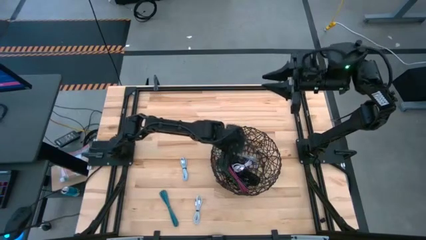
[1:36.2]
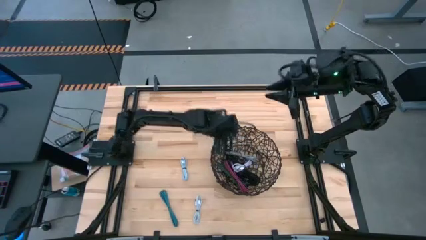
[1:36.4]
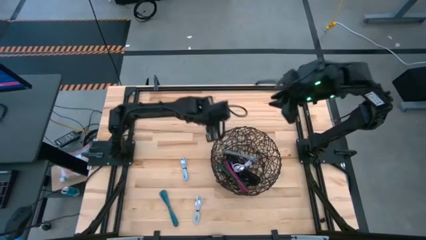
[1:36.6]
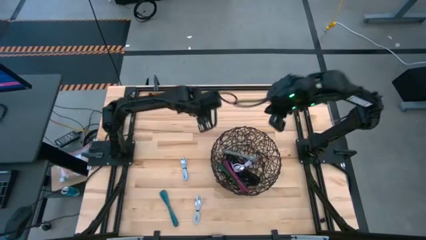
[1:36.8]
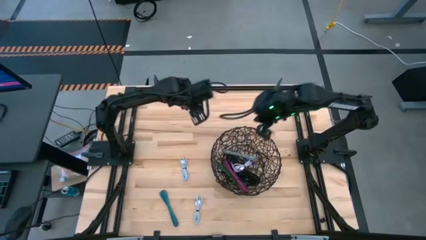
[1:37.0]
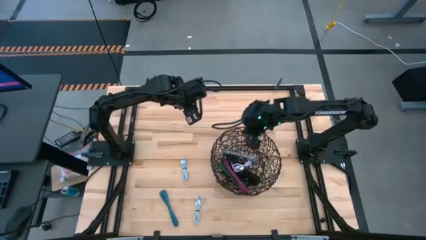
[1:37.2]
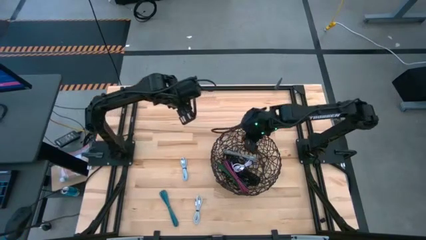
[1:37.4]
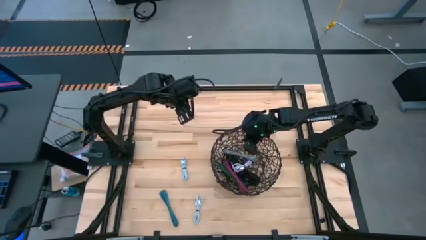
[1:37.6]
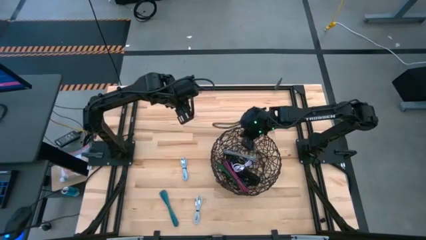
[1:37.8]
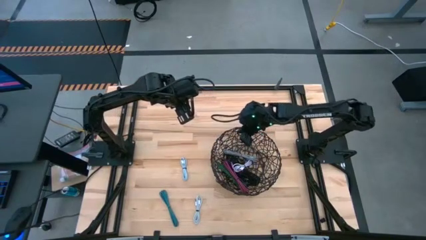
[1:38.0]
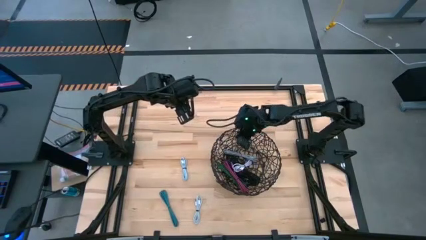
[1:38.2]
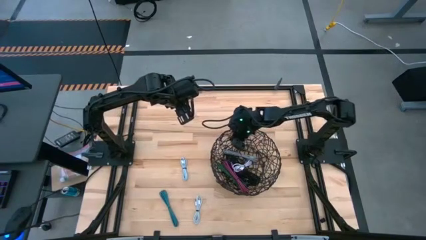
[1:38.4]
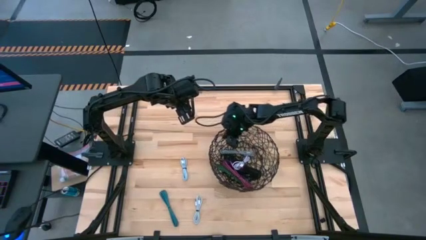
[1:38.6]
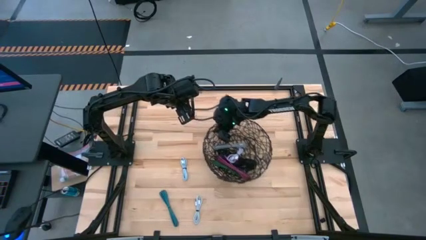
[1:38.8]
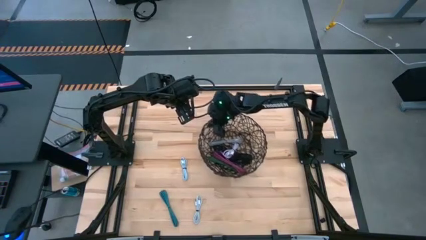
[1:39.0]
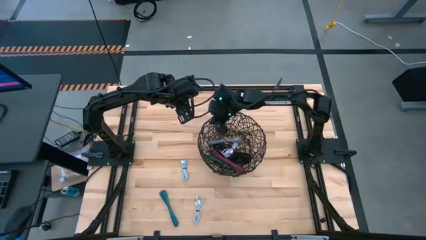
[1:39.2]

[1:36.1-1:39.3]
Task: Pick and place USB-C Cables
Adjust the black wire basket on the table

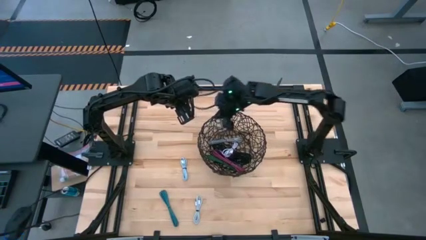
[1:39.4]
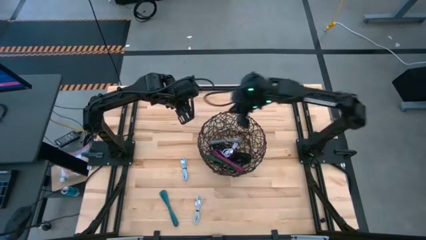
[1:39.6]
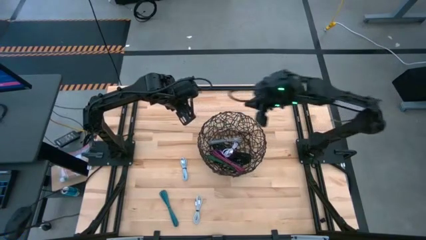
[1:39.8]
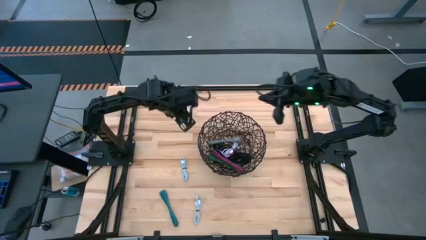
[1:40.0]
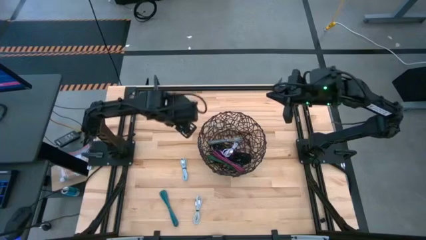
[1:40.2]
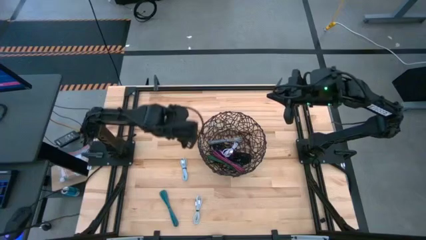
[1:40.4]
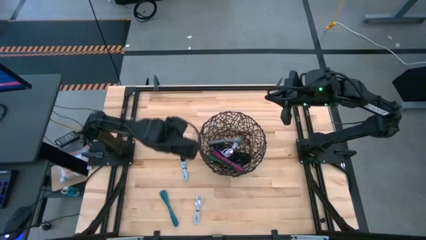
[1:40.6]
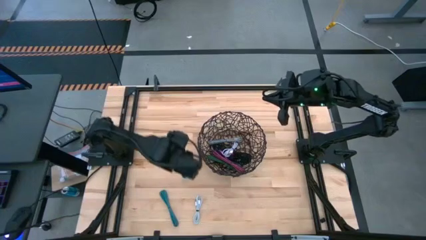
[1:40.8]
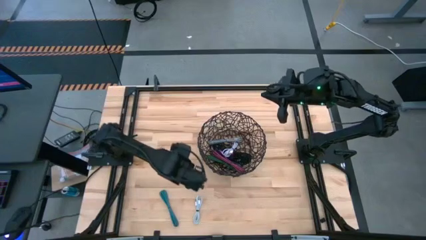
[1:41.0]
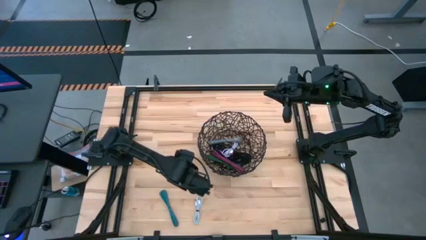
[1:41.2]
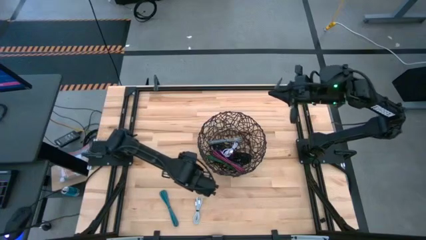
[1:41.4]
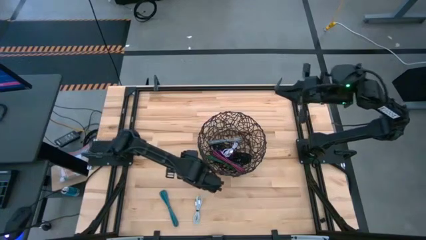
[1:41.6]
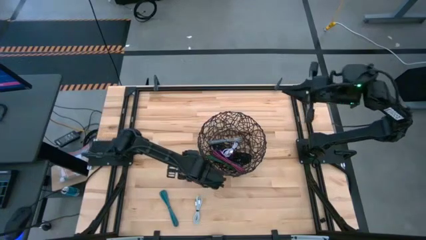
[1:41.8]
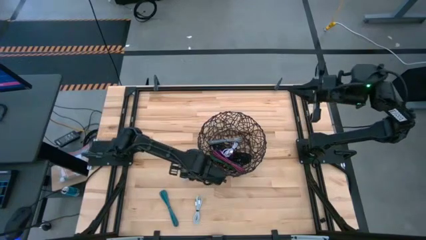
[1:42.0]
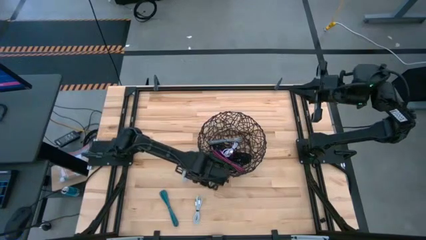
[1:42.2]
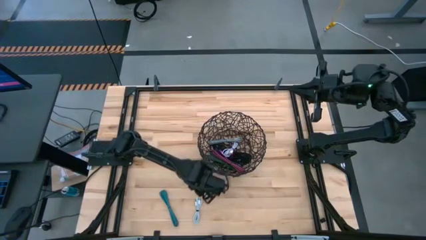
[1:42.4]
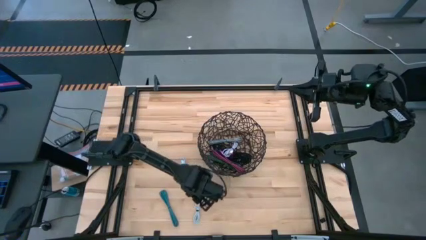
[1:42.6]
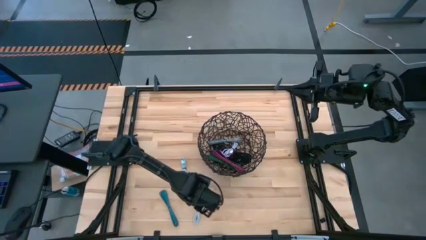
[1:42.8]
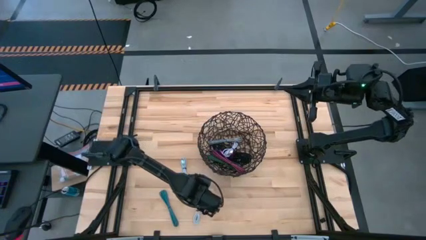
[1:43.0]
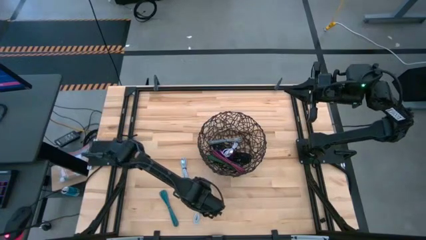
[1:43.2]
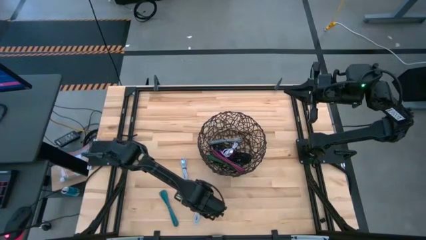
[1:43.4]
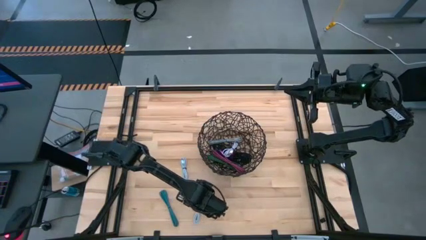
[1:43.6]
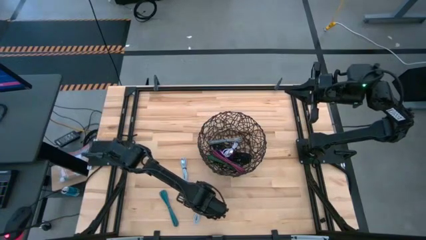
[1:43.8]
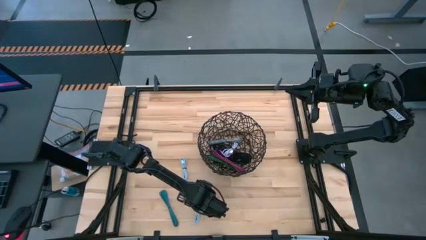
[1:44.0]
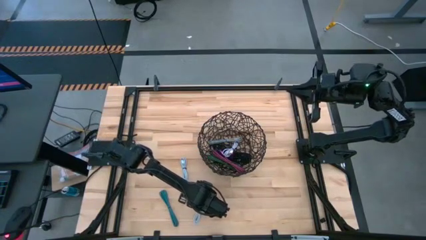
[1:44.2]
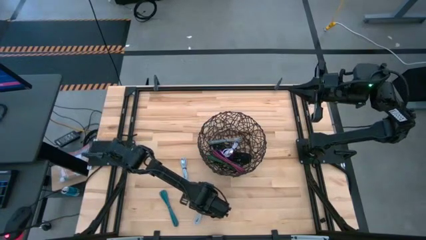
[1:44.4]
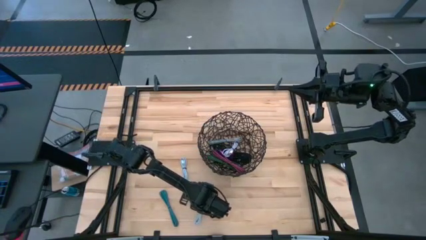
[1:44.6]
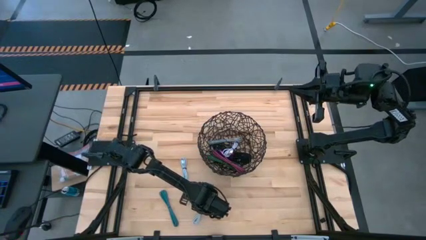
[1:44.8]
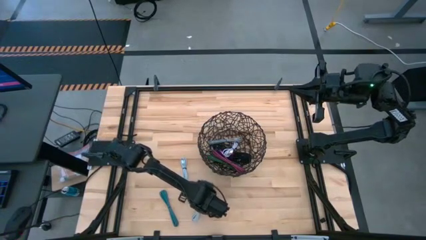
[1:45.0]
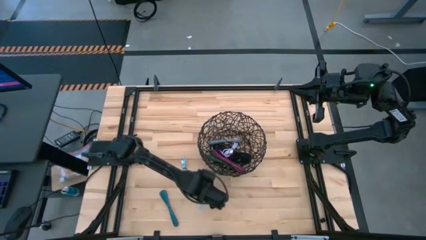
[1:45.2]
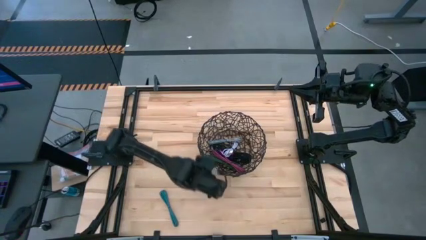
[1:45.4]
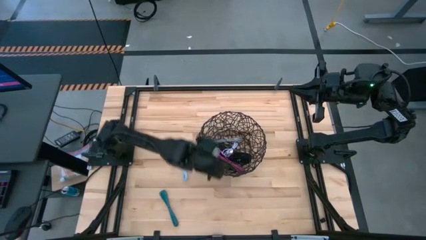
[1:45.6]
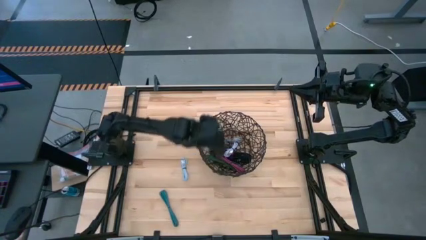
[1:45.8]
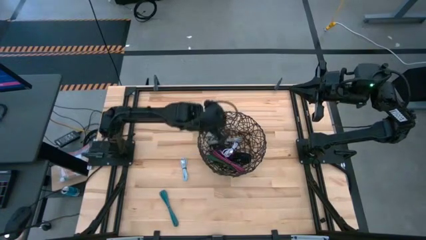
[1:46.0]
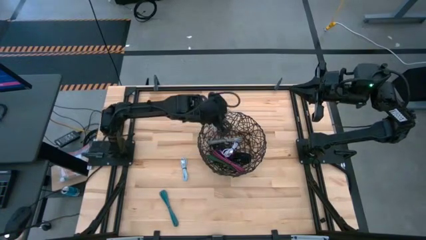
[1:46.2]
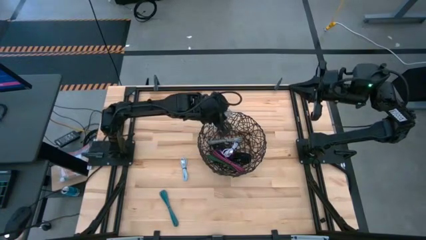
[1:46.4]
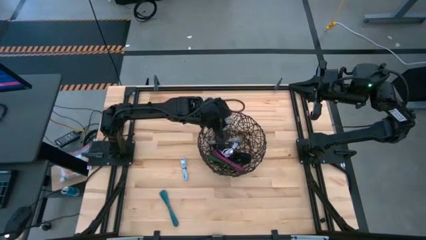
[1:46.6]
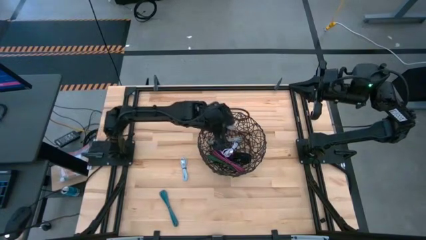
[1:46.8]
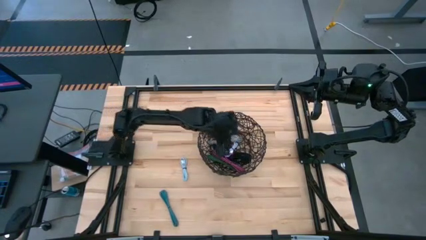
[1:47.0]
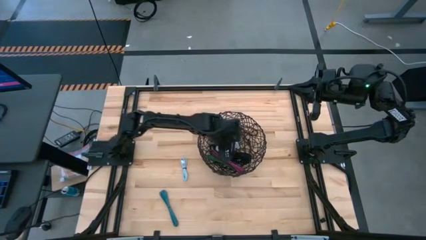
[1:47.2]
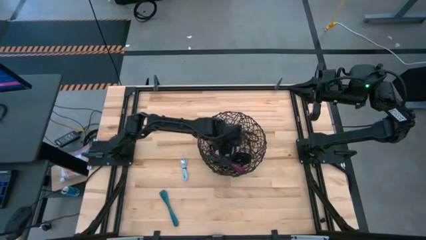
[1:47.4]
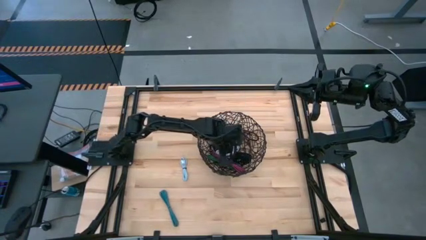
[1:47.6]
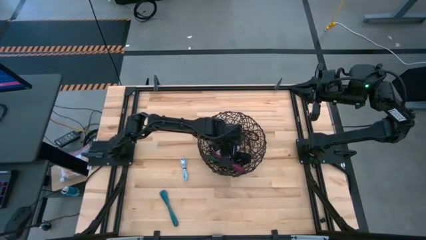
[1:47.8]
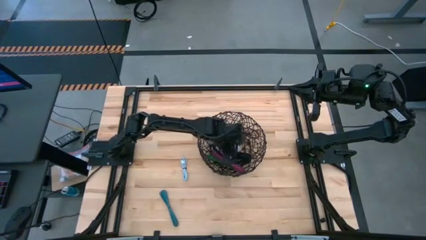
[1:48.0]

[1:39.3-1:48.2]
Put the bottom gray charger cable into the black wire basket

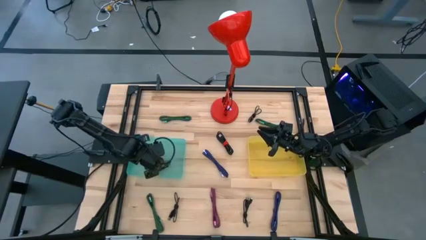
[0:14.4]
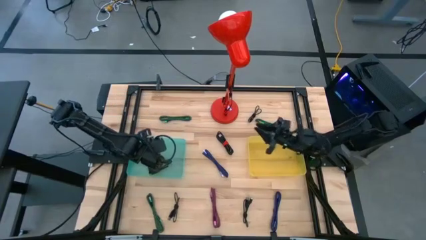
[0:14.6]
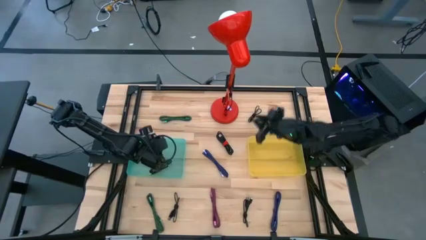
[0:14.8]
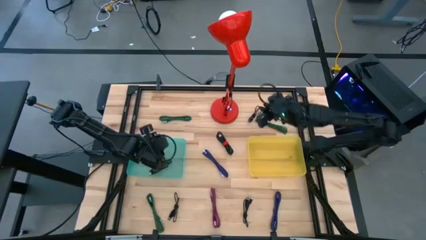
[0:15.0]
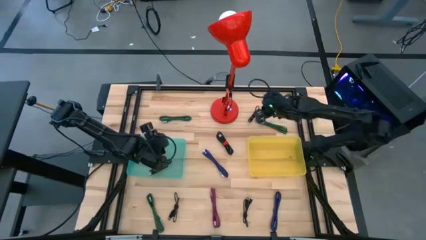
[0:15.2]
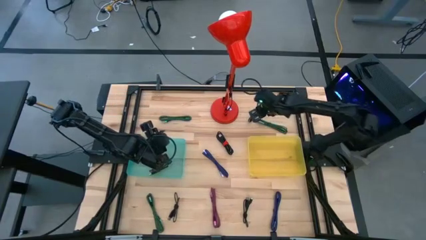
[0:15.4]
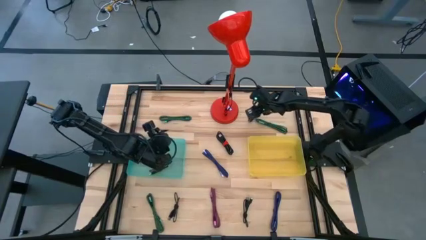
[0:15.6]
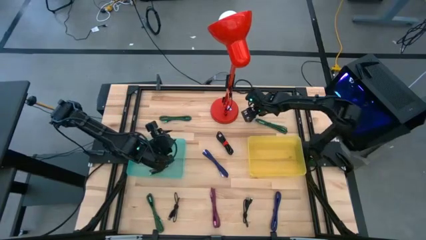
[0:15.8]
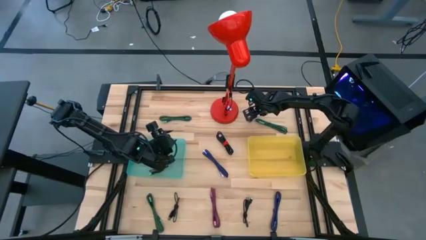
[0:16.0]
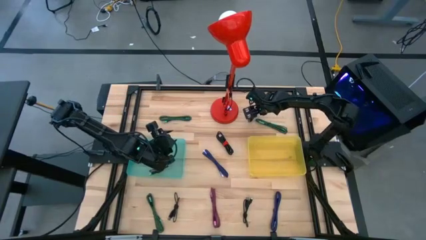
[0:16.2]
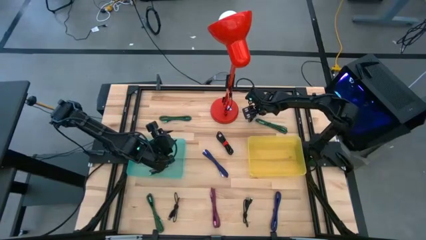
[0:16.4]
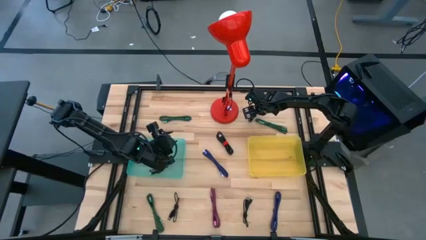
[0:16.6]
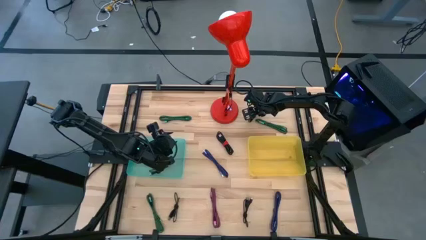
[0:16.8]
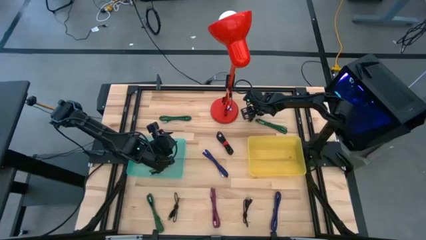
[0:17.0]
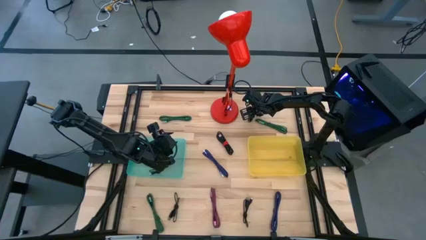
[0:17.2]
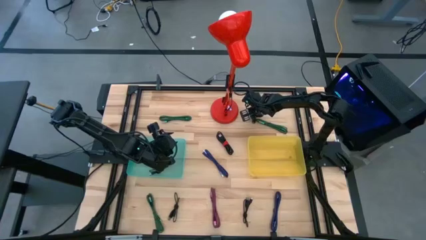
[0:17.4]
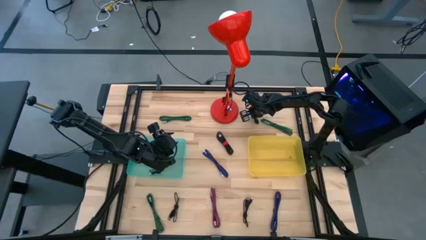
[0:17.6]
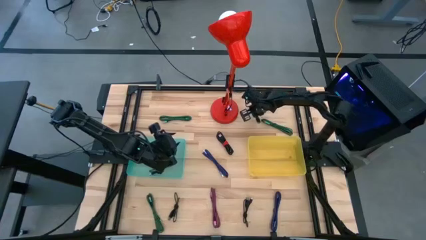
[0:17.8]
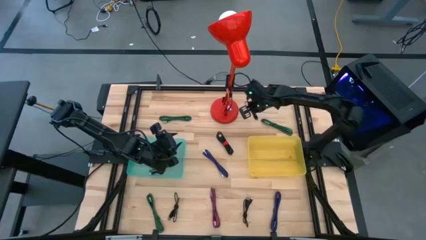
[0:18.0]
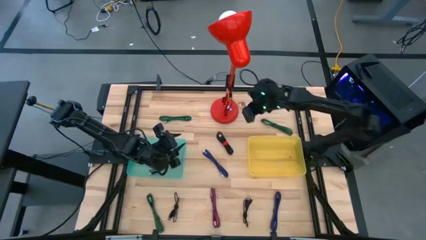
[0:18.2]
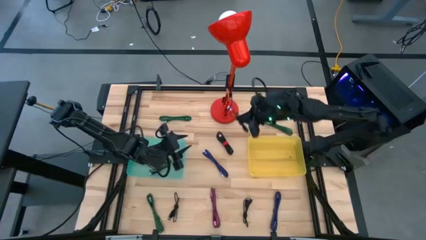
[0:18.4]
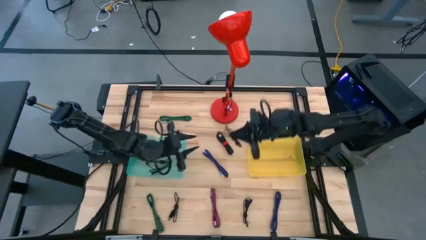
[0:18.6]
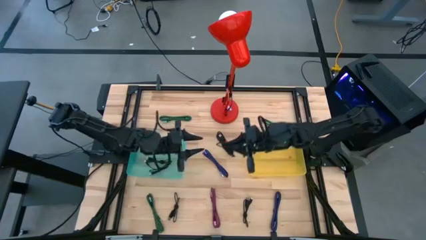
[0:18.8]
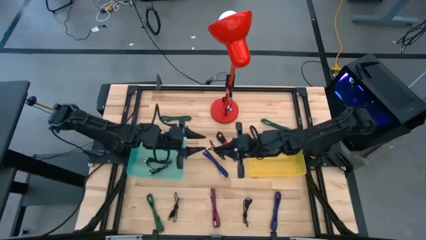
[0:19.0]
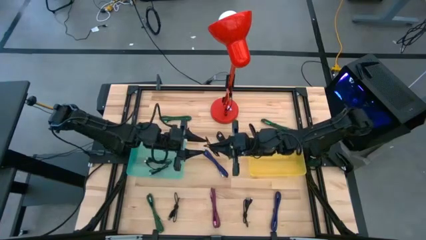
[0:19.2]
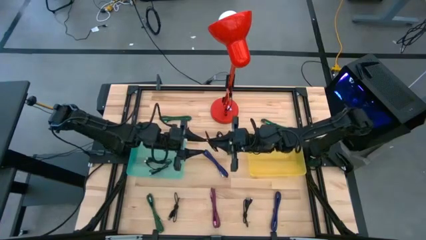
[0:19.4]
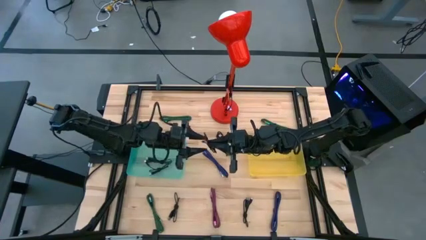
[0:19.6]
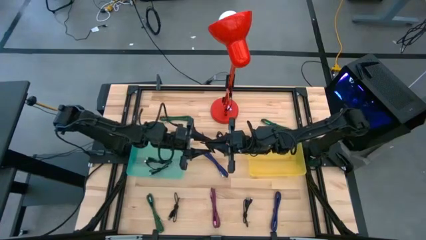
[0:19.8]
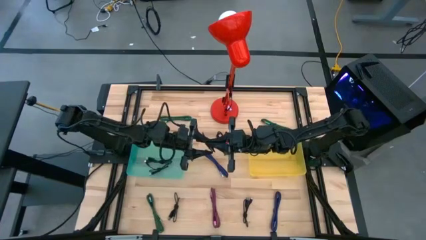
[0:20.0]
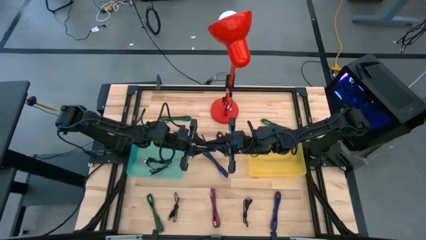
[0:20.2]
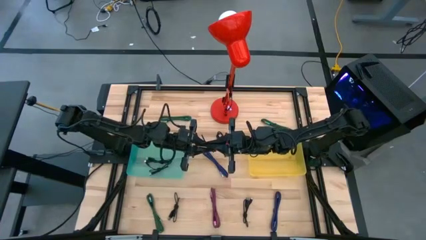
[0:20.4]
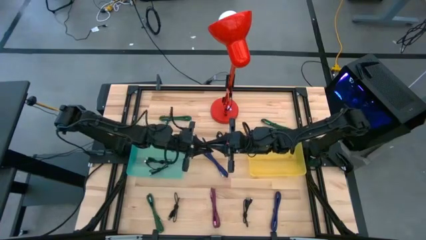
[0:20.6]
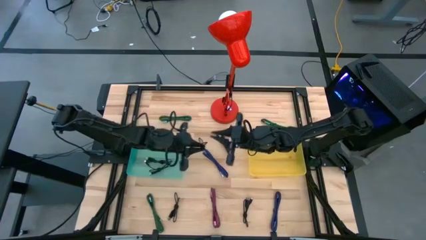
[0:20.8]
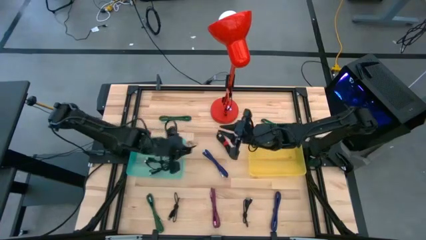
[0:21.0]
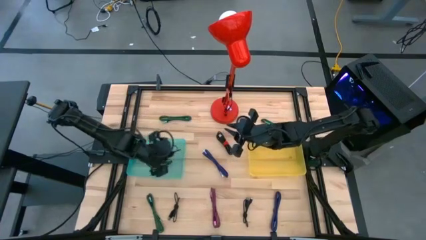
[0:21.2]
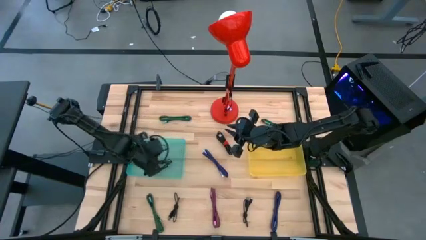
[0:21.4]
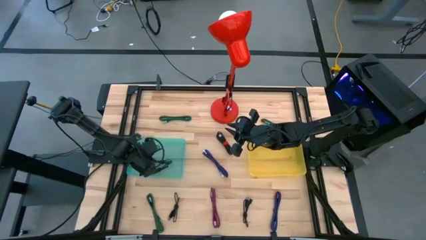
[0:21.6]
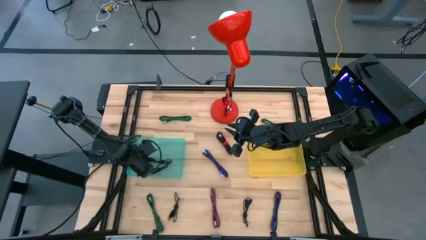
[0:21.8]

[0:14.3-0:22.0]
Task: Pick & Place USB Port
Put the black charger cable into the green bin
